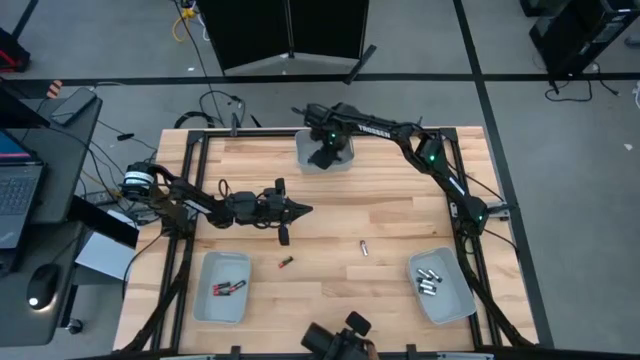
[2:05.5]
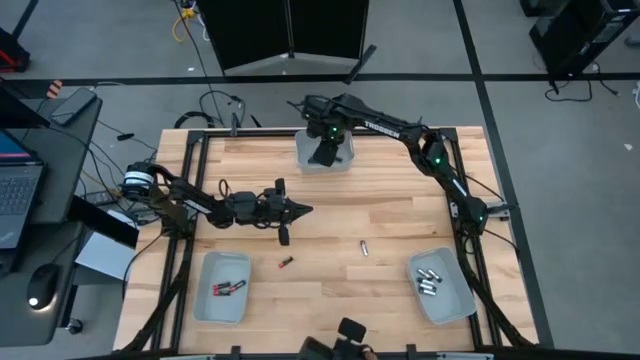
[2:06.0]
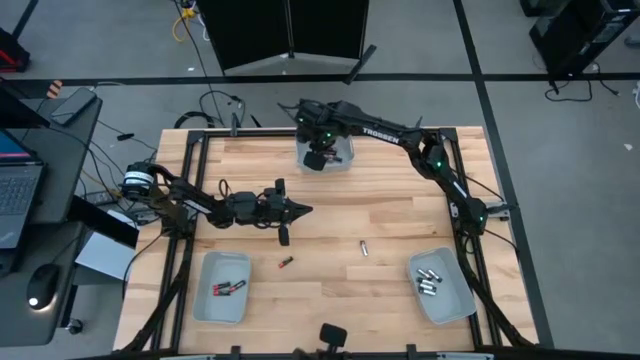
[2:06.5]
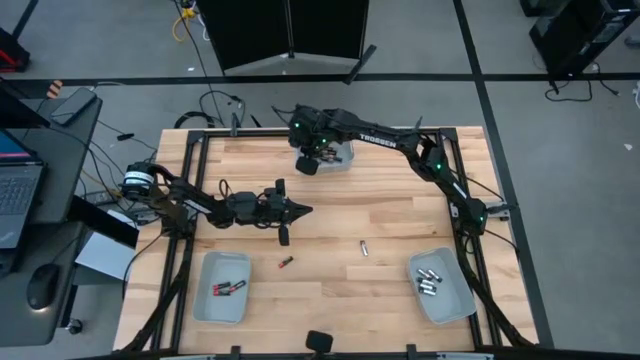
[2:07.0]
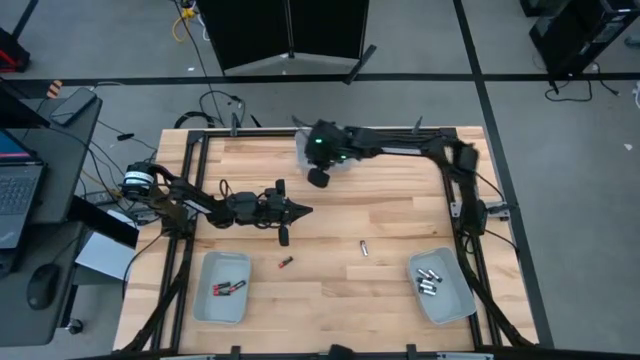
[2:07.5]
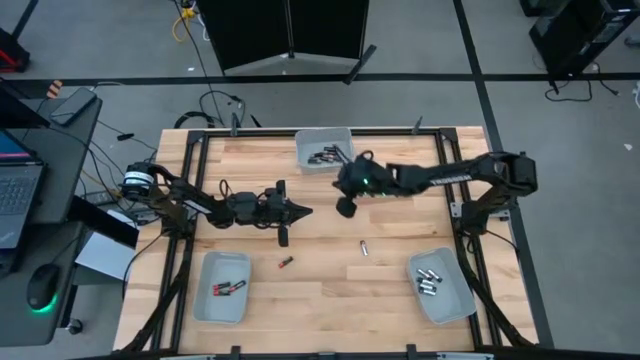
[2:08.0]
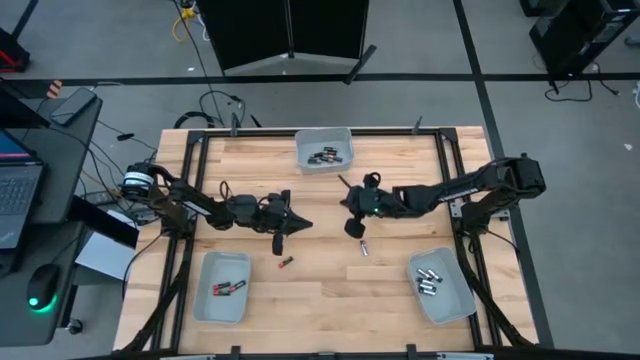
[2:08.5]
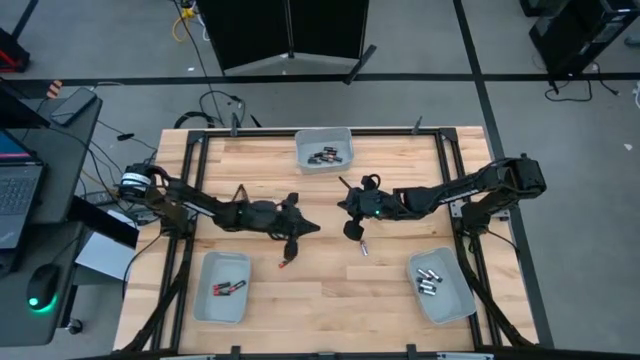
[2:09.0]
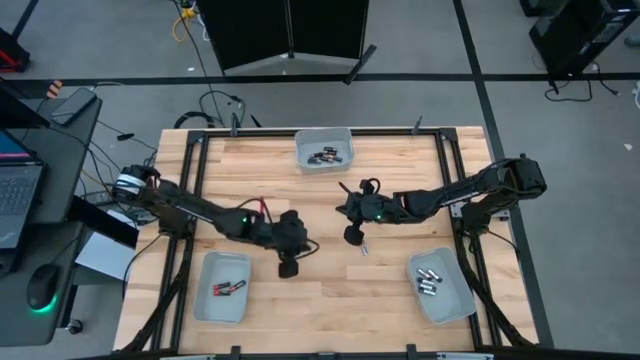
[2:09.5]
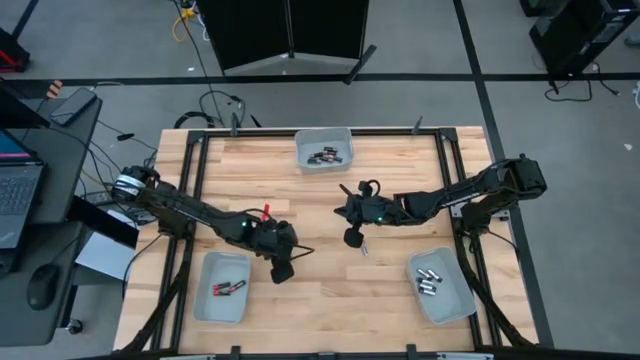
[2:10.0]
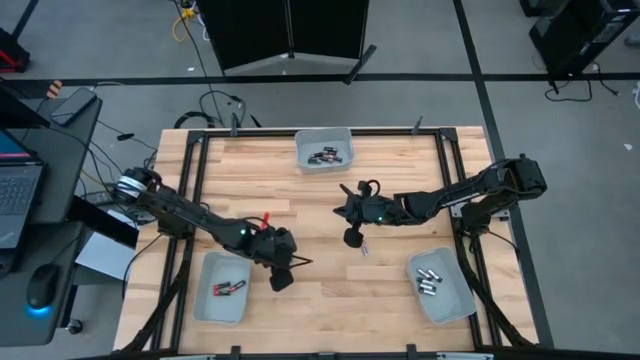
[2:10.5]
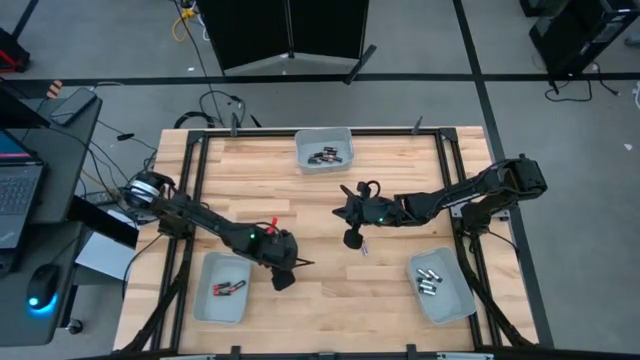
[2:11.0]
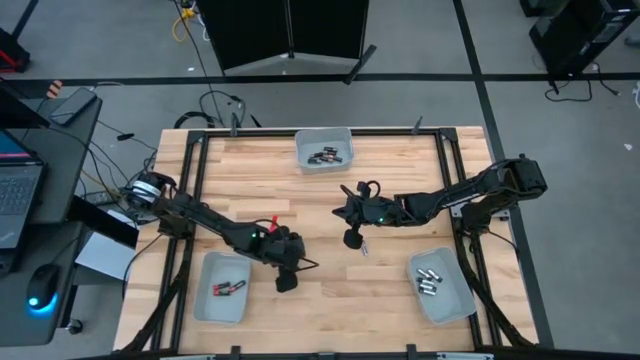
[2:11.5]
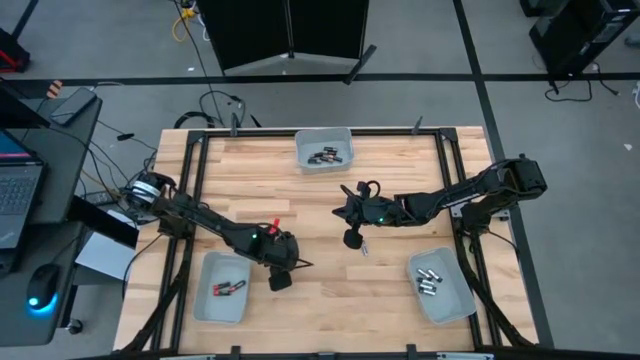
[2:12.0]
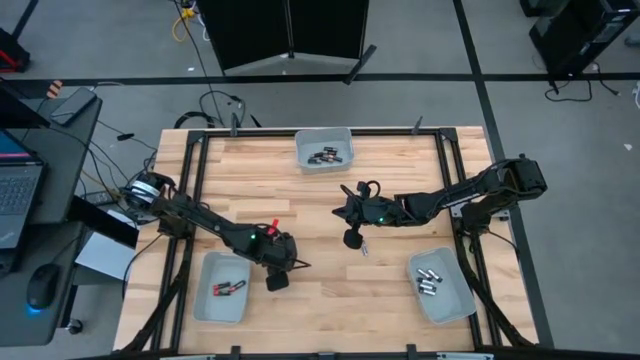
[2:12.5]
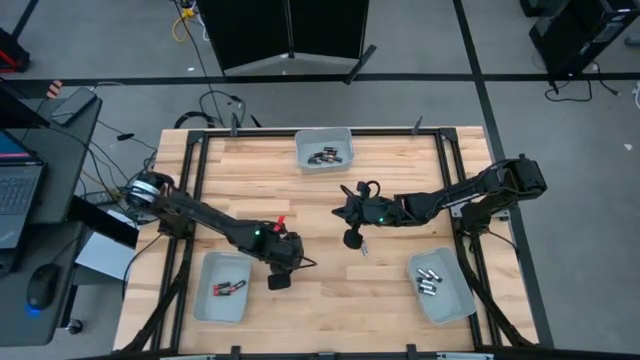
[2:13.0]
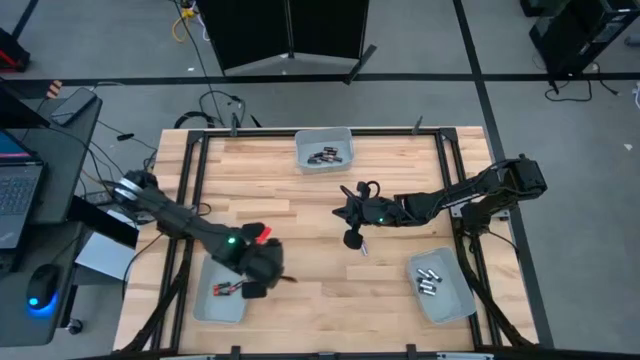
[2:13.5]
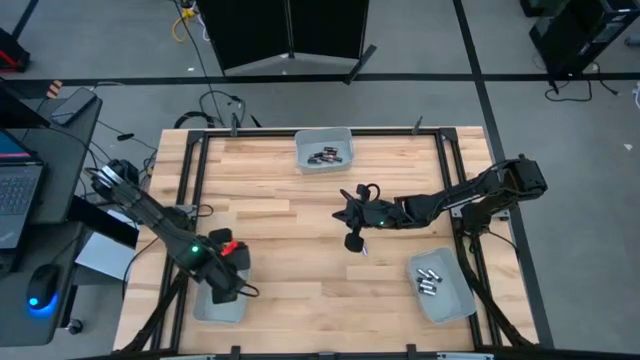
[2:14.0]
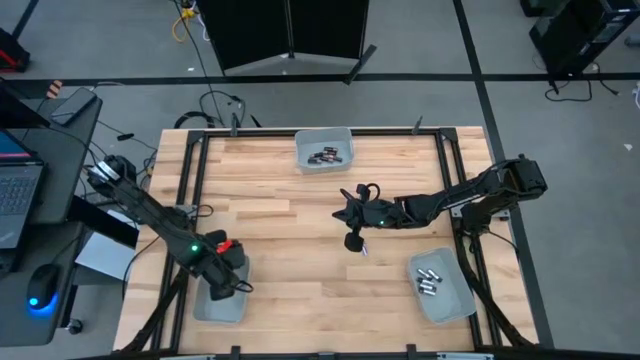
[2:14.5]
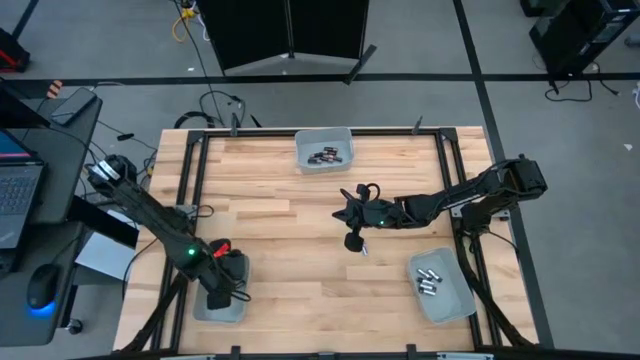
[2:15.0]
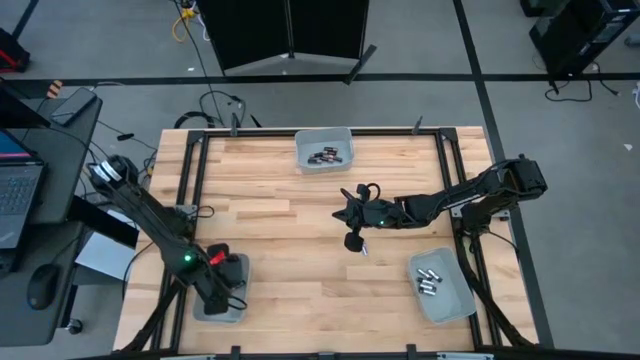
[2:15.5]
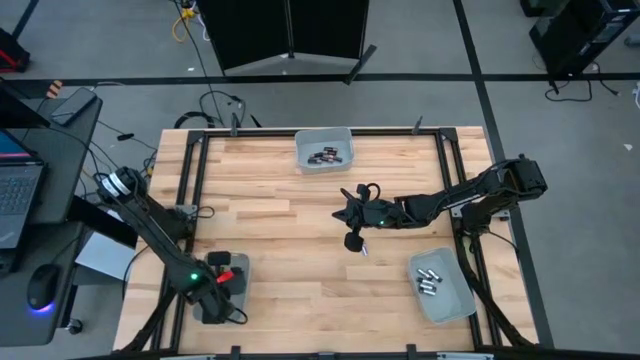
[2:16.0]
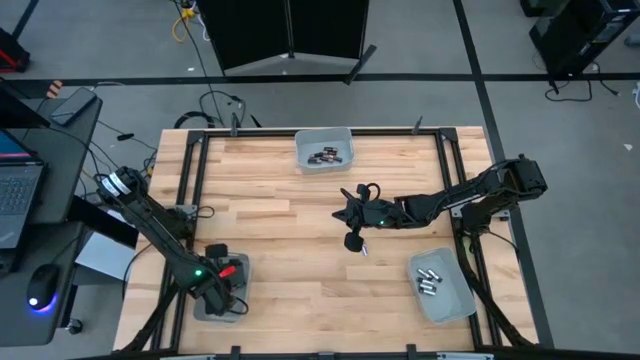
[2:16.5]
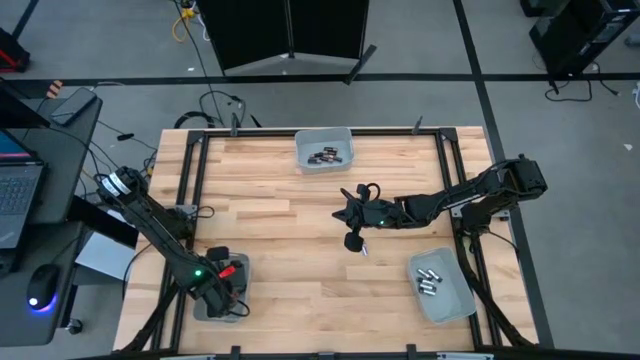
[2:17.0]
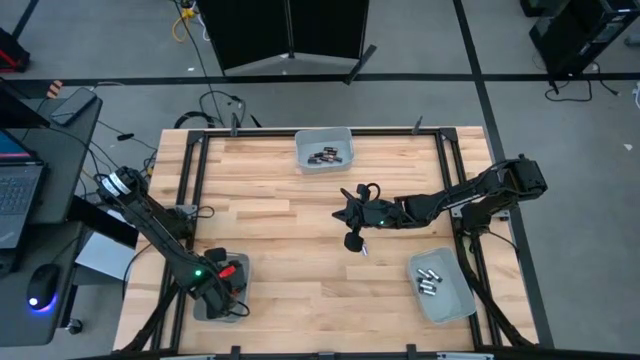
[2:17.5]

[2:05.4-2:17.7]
Task: Sort batteries
Put the red battery into the bottom left gray bin

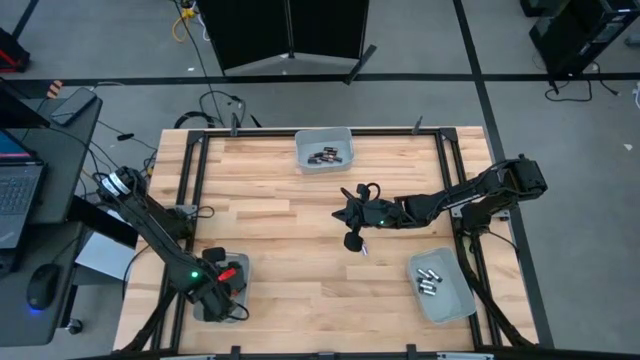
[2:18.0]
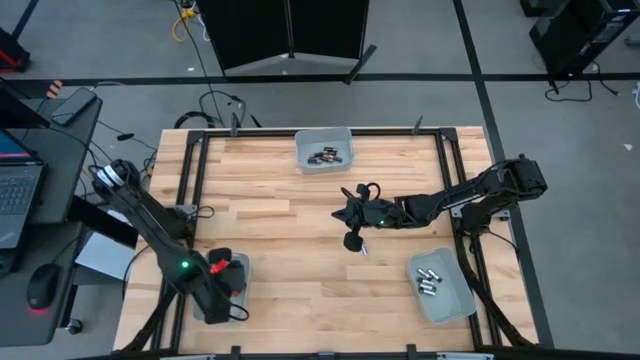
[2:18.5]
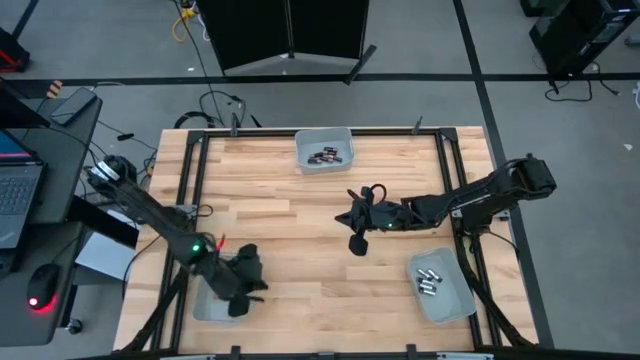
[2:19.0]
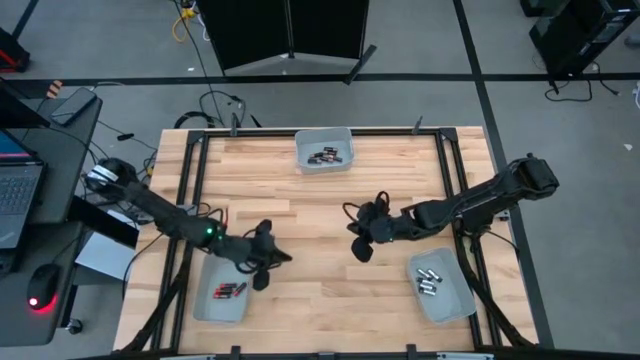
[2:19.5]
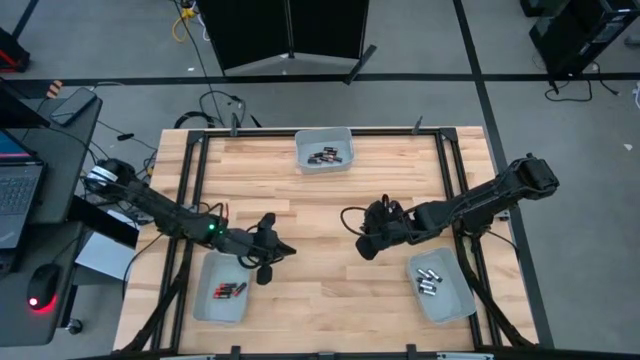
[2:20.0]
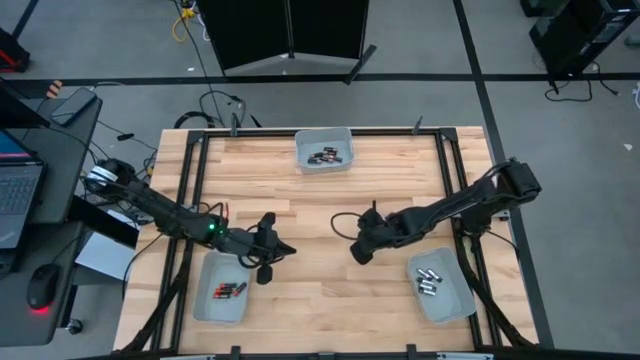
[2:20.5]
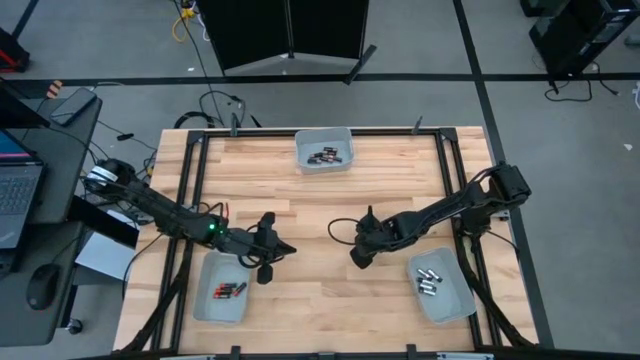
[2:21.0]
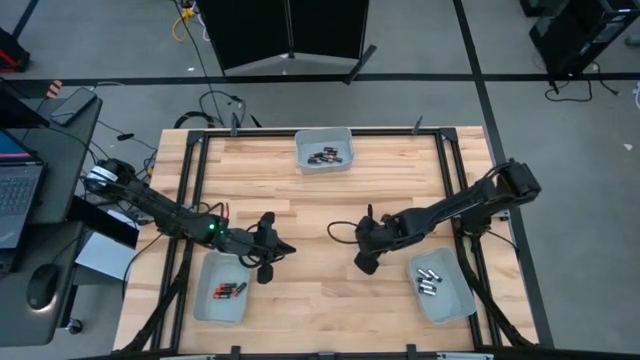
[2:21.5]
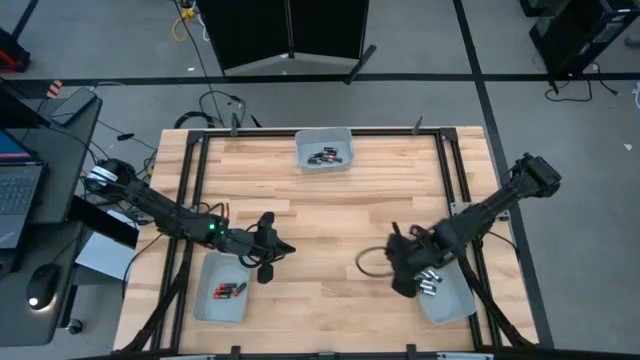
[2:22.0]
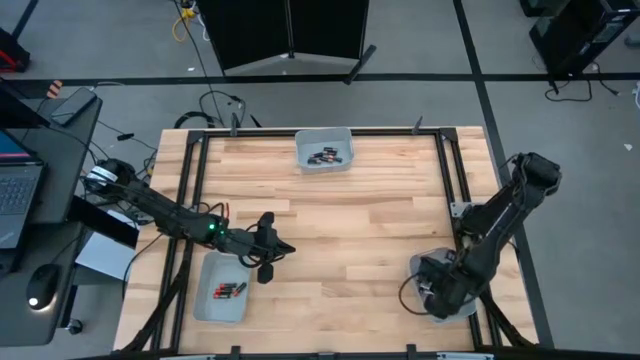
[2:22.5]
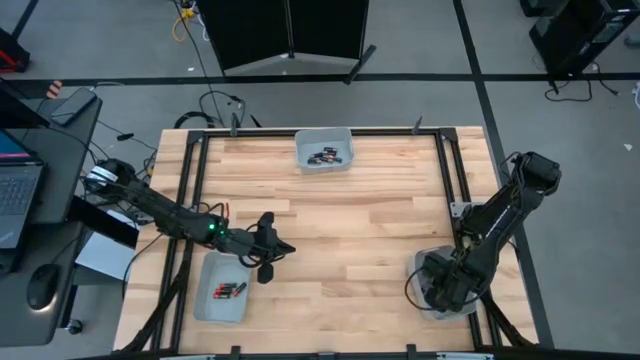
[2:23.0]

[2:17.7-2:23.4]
Put the silver battery into the bottom right gray bin

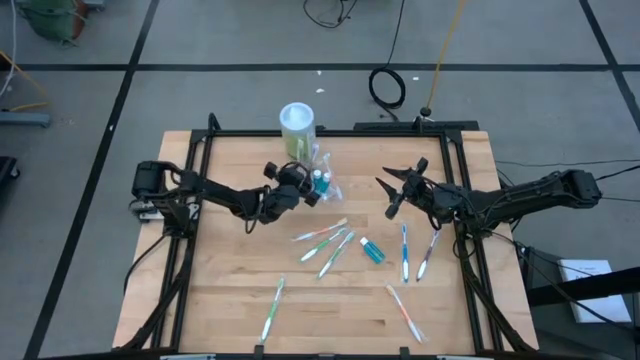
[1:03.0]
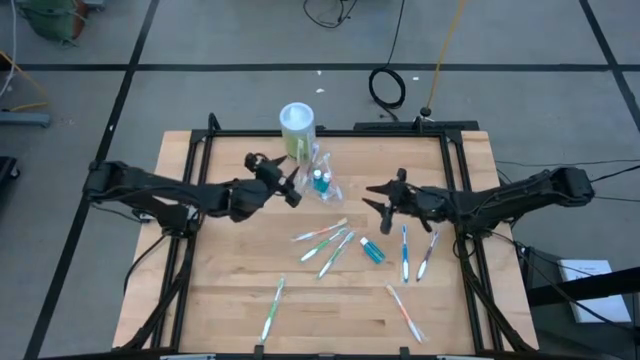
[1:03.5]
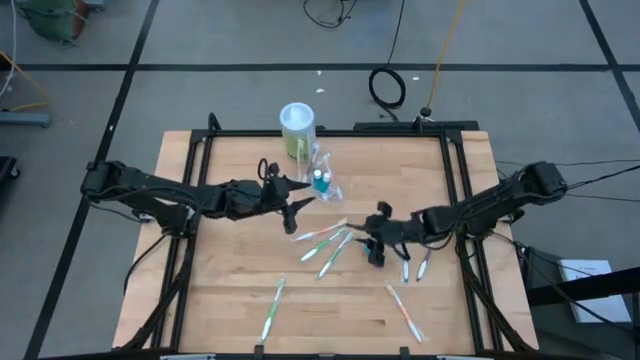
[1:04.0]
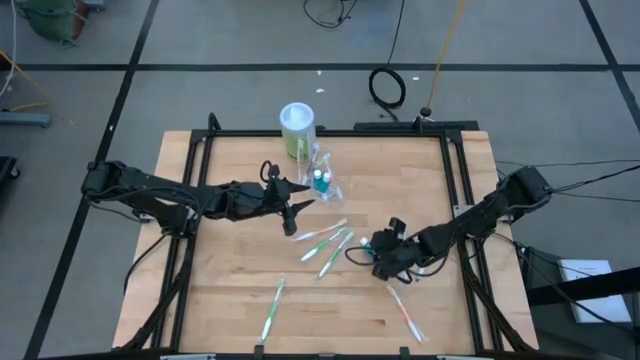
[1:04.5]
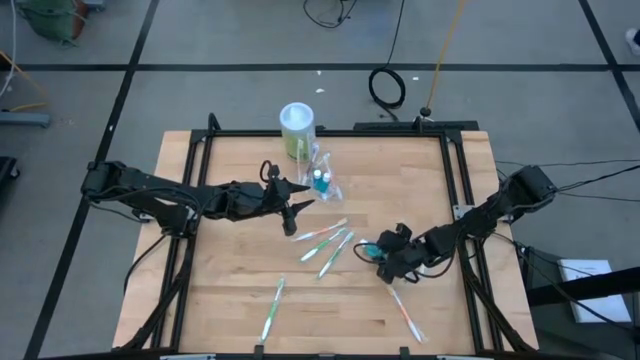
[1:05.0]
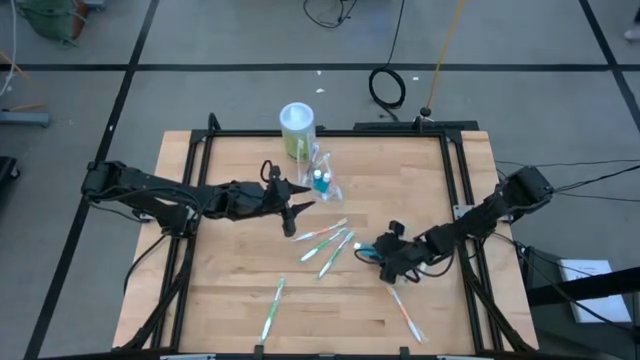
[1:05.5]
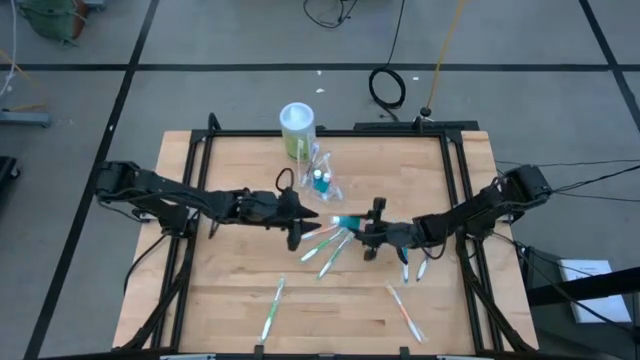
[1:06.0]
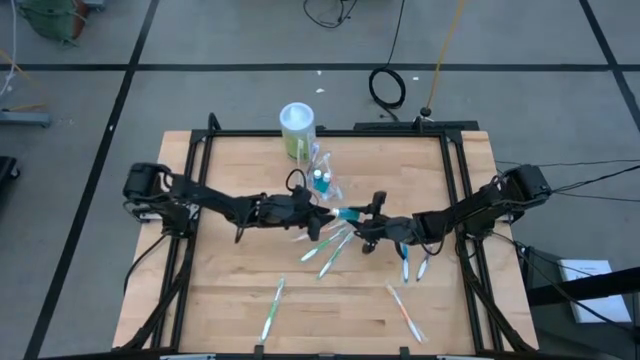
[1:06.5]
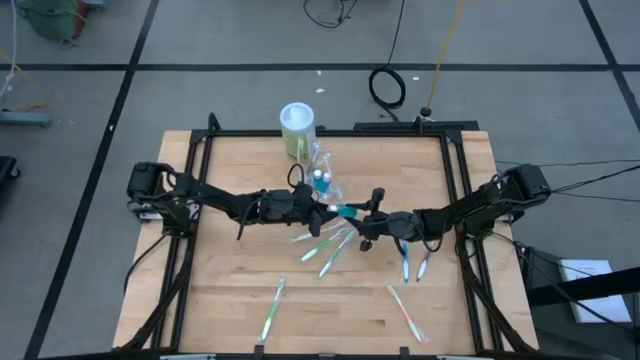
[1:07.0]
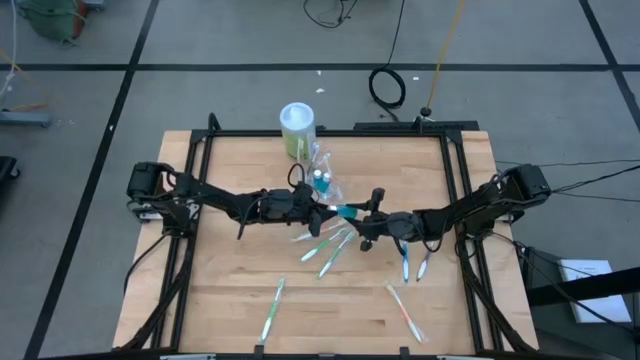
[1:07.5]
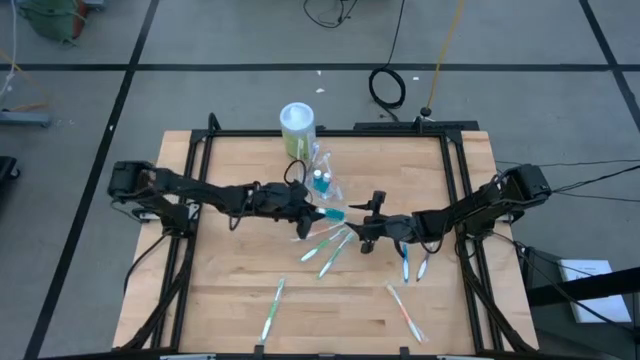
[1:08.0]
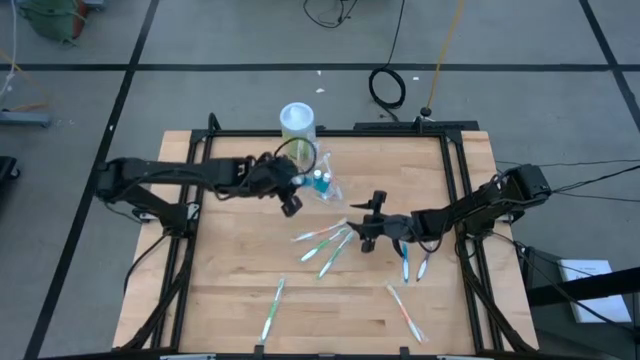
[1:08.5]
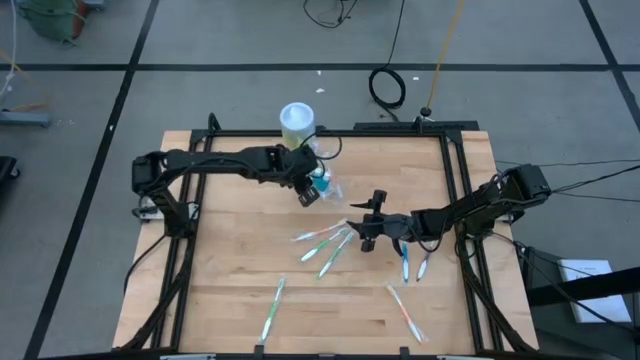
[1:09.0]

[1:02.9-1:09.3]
Task: Pick & Place toothbrushing station
Put the blue mouthwash bottle into the middle of the transparent organizer
